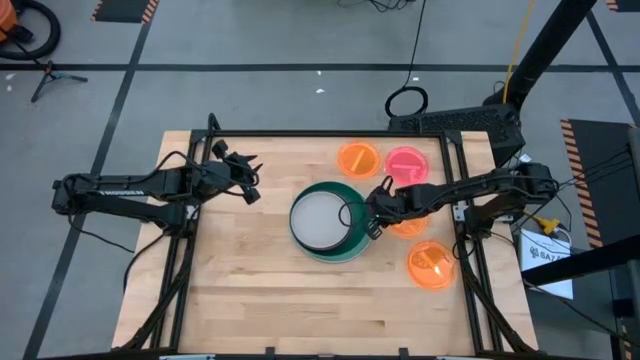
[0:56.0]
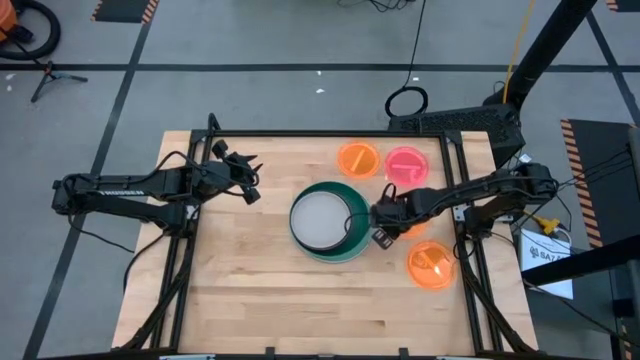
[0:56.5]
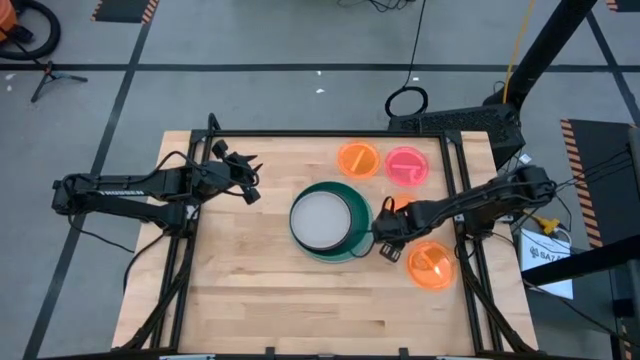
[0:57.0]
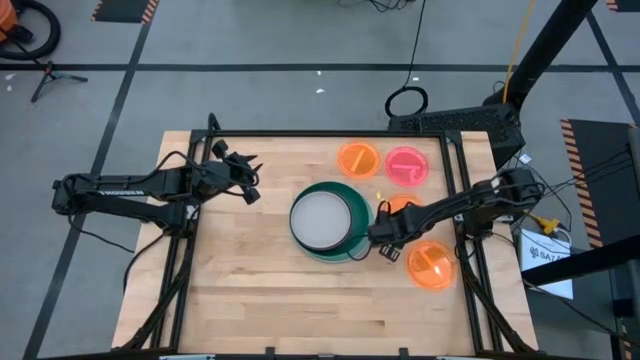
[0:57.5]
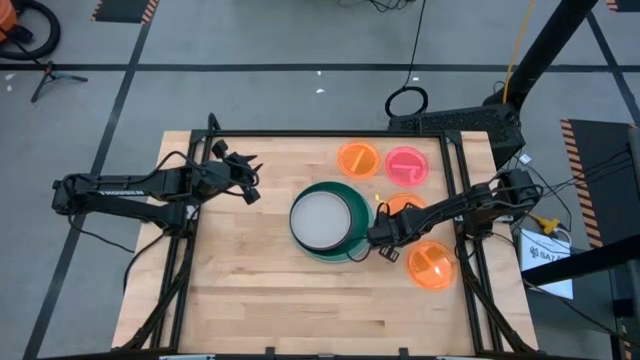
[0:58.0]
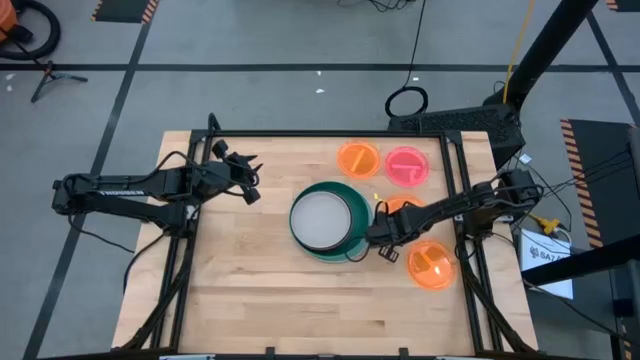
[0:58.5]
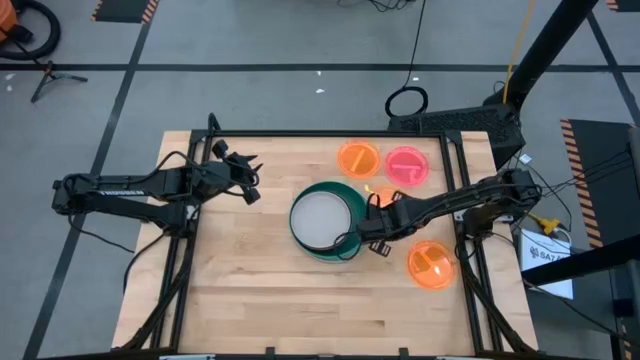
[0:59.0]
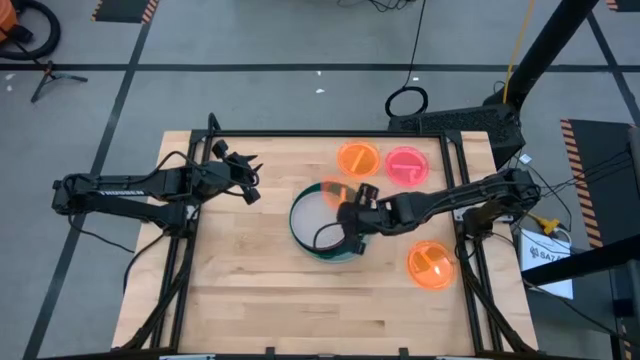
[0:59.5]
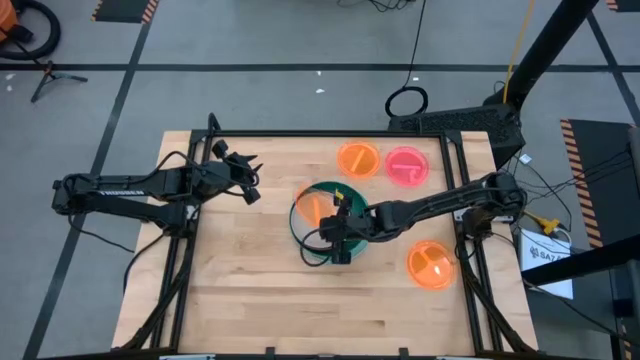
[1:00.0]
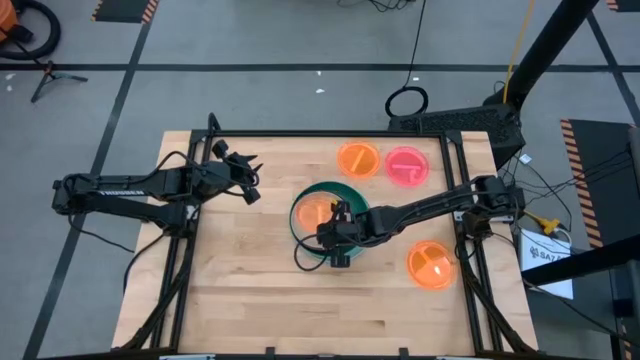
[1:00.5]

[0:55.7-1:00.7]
Task: Stack plastic plates
Stack the middle light orange plate on top of the gray plate

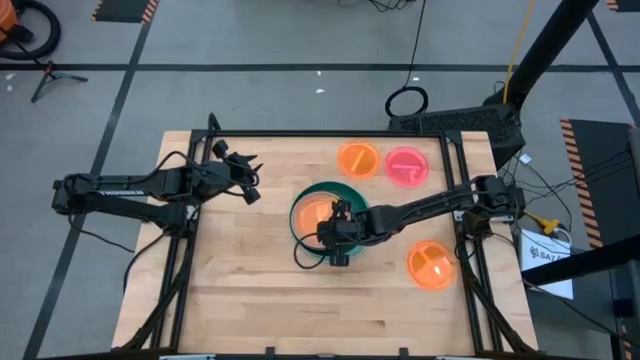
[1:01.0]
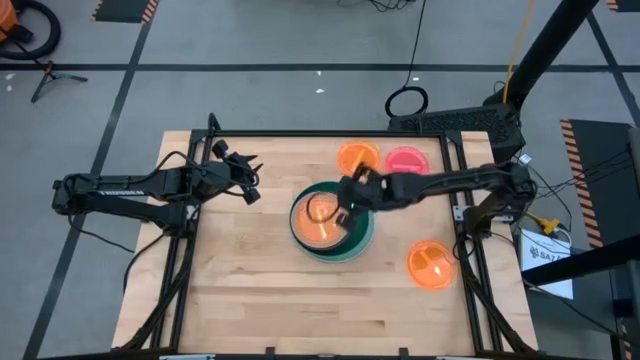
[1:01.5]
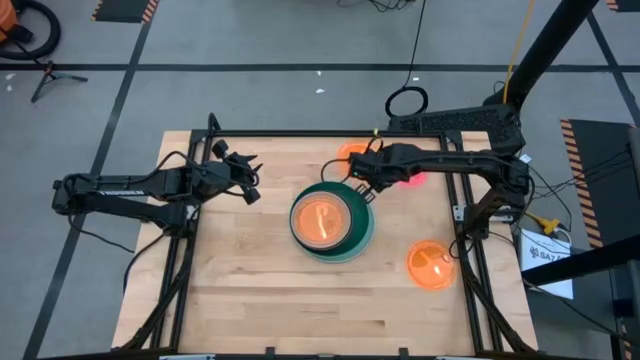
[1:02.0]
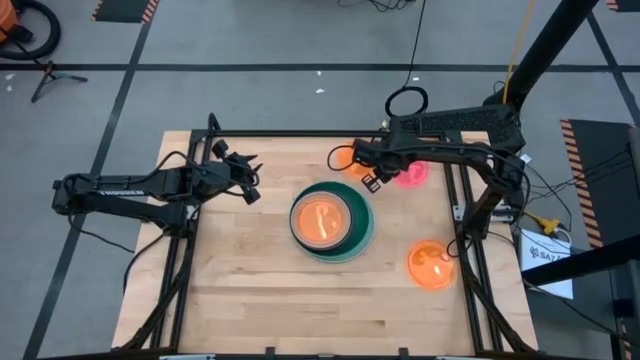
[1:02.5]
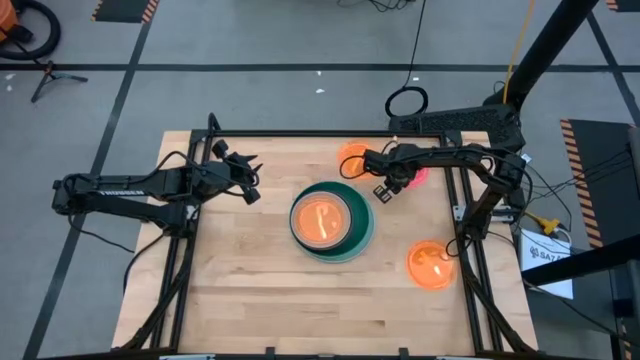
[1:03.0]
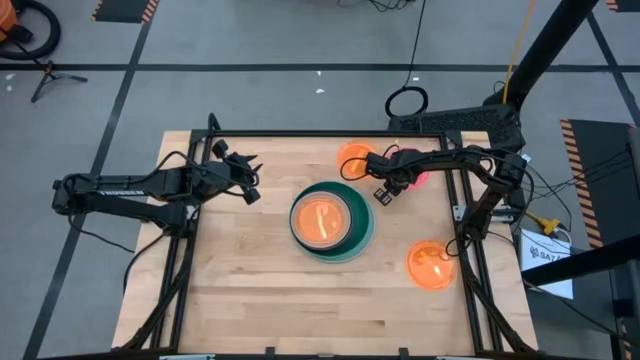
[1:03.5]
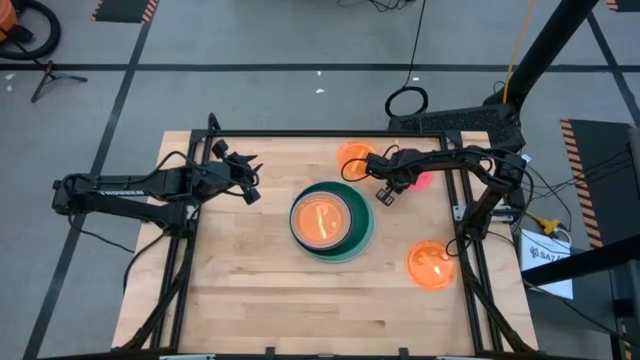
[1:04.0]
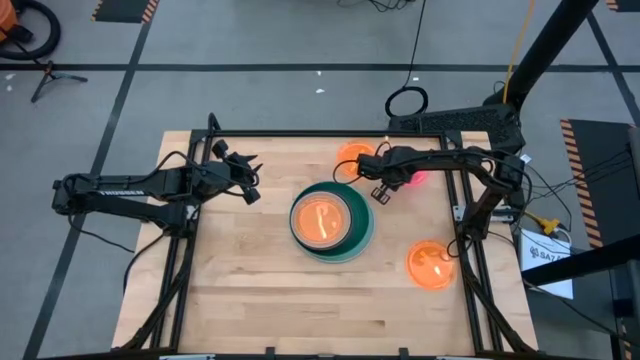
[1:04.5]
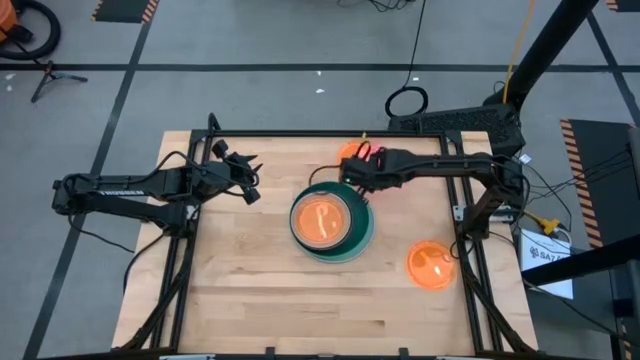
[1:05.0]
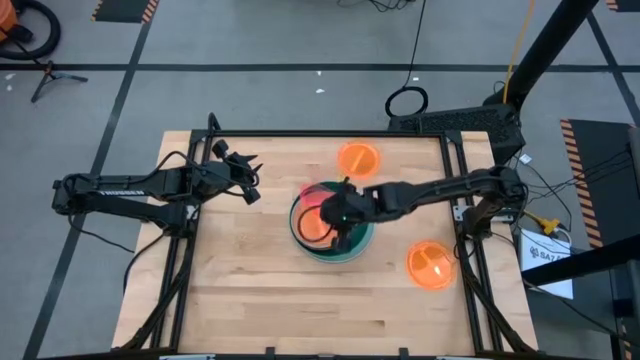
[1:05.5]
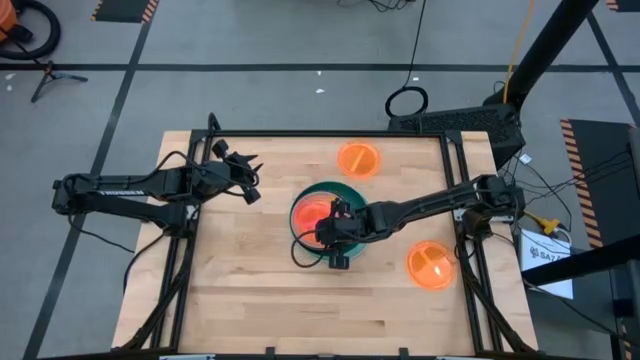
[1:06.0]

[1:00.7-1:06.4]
Stack the pink plate on top of the light orange plate

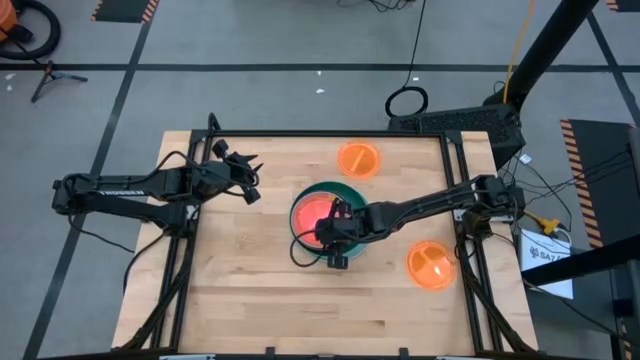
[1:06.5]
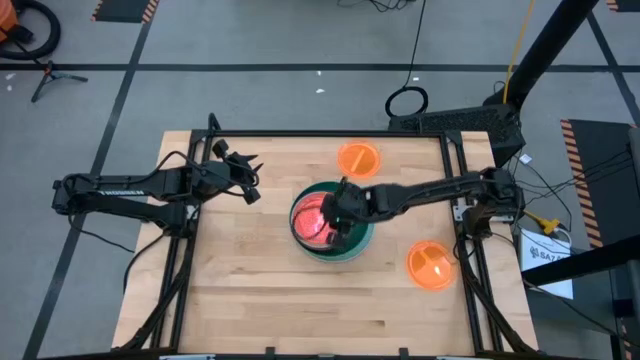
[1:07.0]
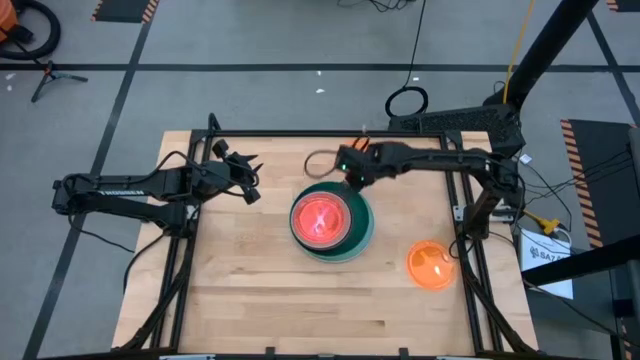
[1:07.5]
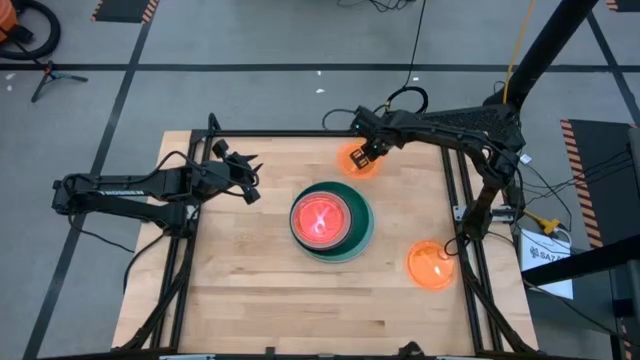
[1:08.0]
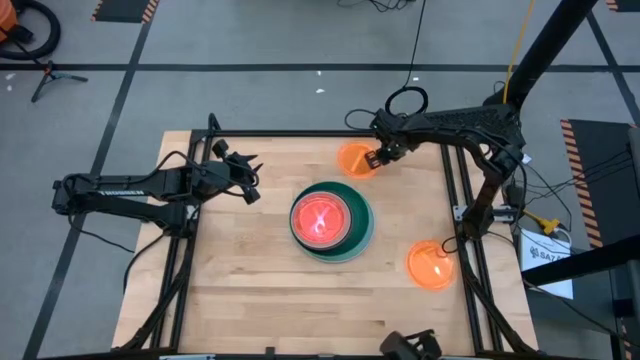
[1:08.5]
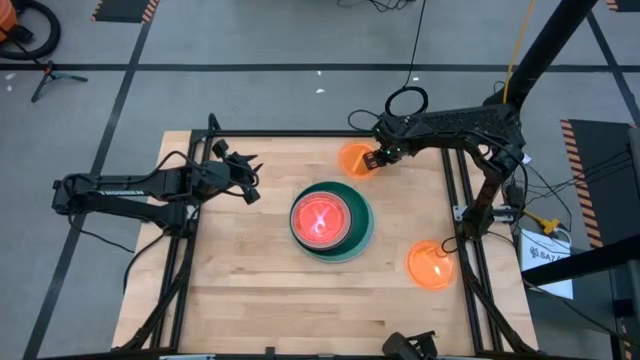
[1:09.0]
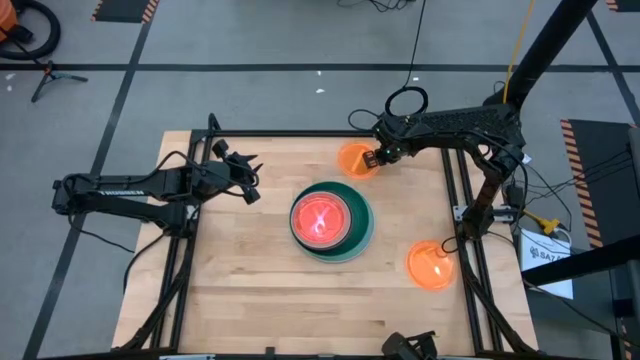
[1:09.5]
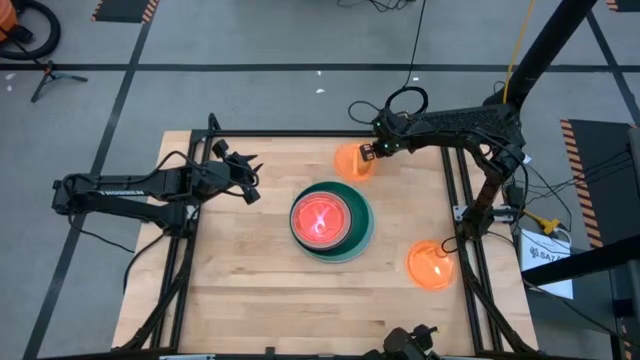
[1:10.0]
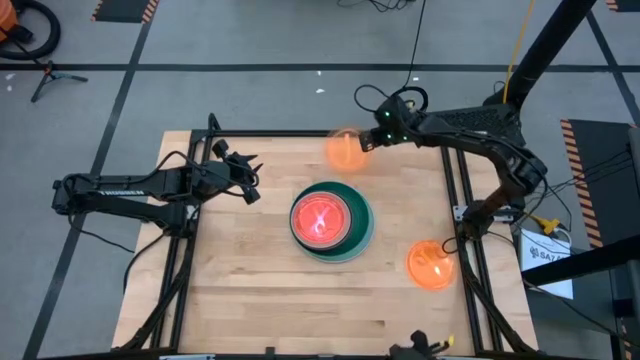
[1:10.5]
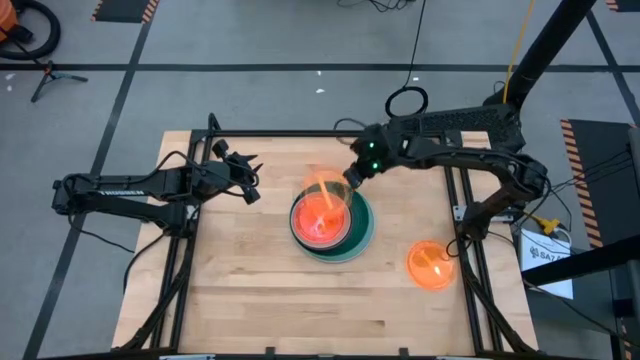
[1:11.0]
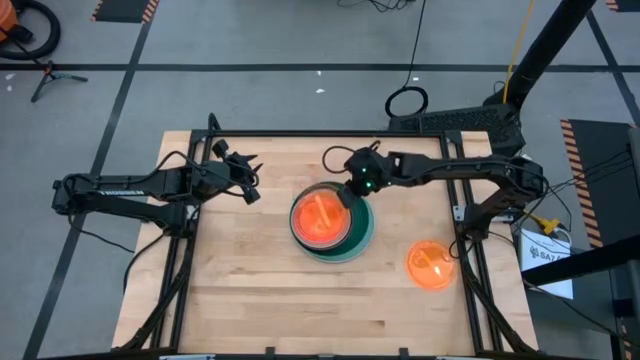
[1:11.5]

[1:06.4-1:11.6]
Stack the top light orange plate on top of the pink plate

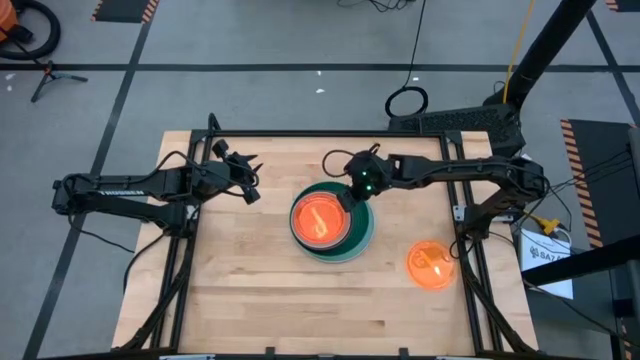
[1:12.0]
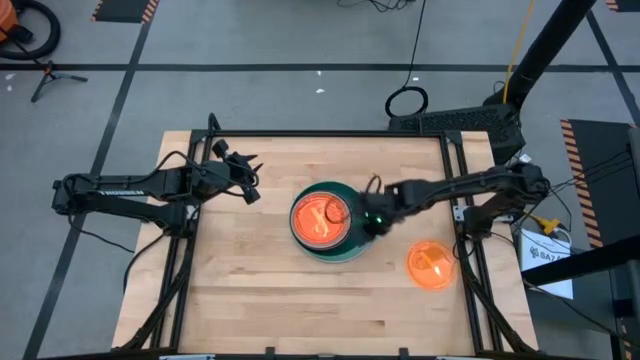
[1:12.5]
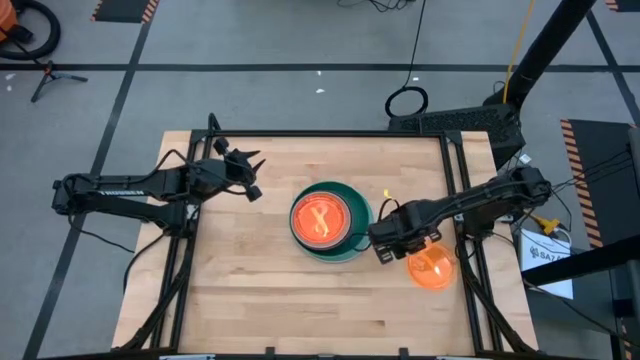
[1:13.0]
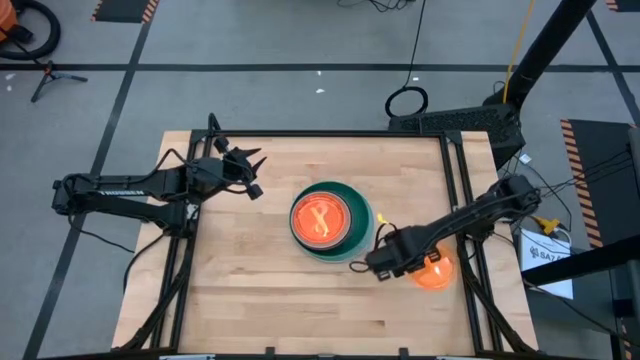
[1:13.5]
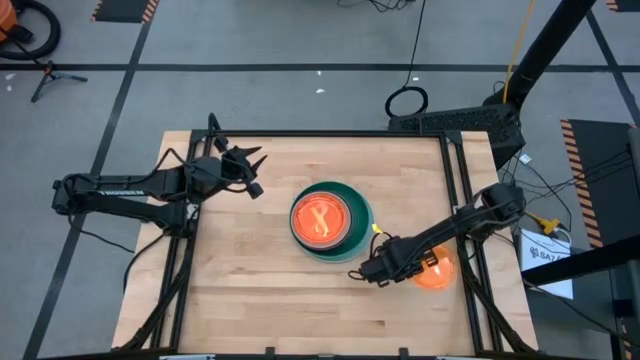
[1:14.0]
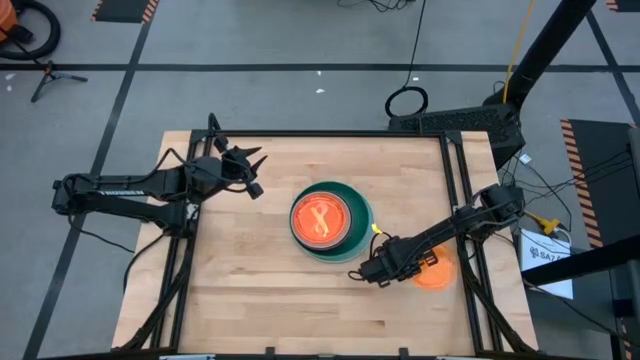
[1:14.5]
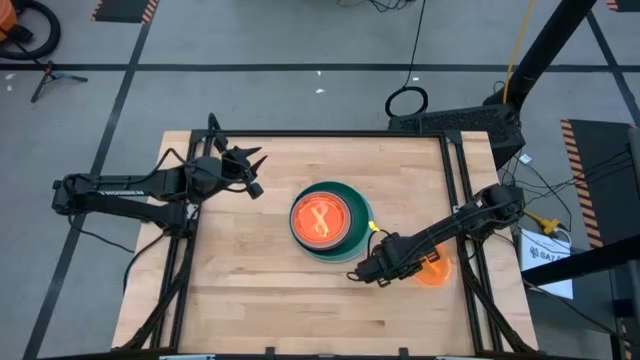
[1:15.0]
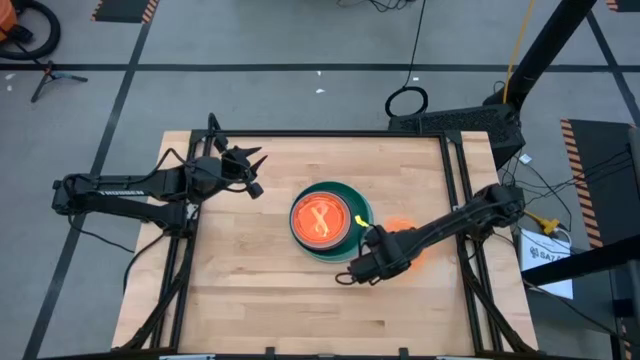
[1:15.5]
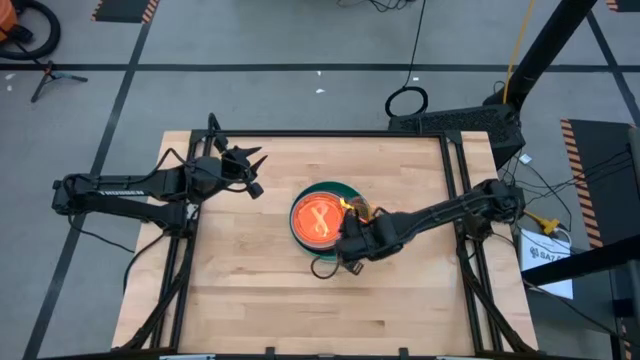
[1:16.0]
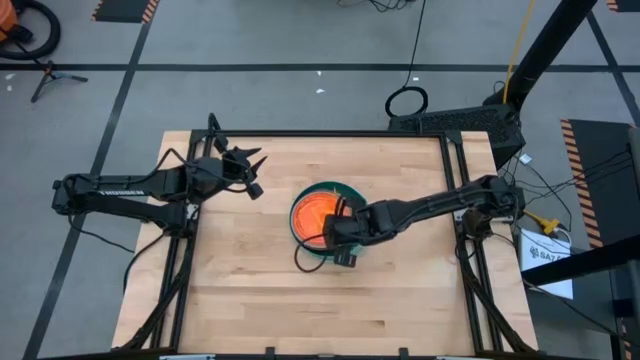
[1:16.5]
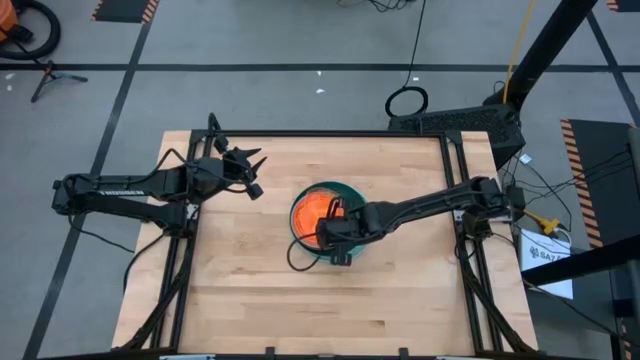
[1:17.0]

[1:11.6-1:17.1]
Stack the light orange plate on top of the light orange plate
